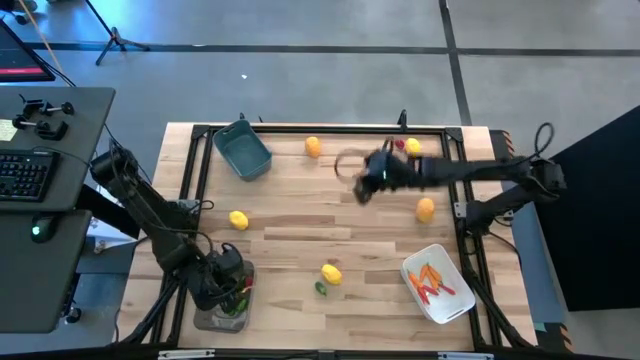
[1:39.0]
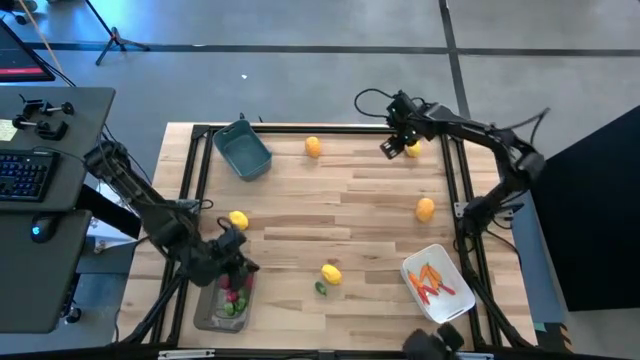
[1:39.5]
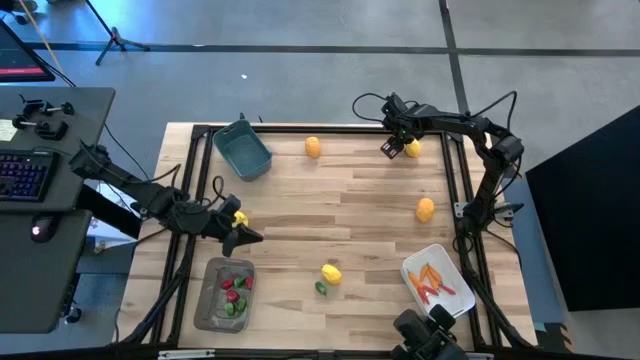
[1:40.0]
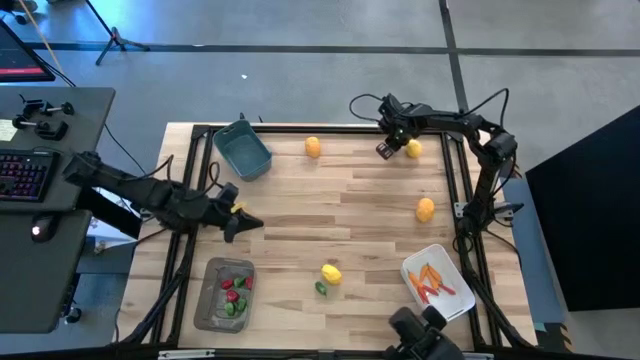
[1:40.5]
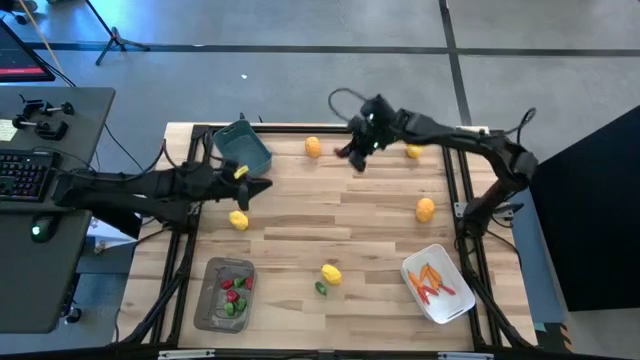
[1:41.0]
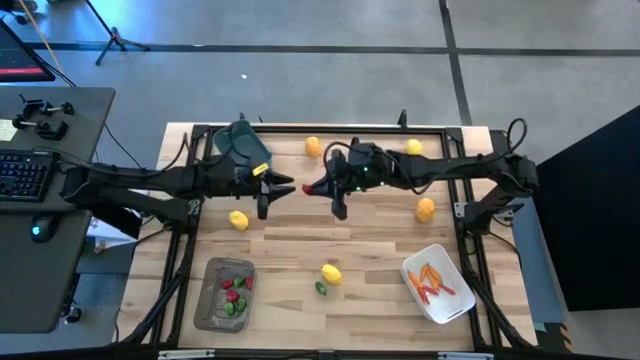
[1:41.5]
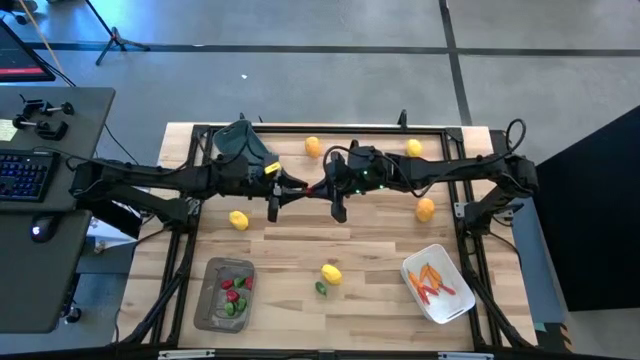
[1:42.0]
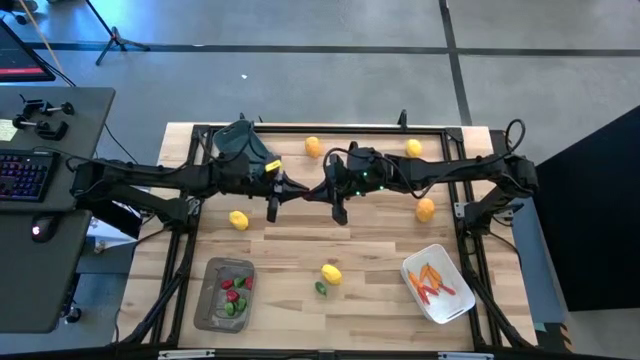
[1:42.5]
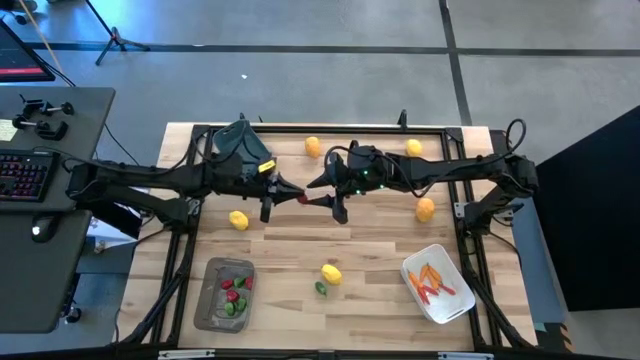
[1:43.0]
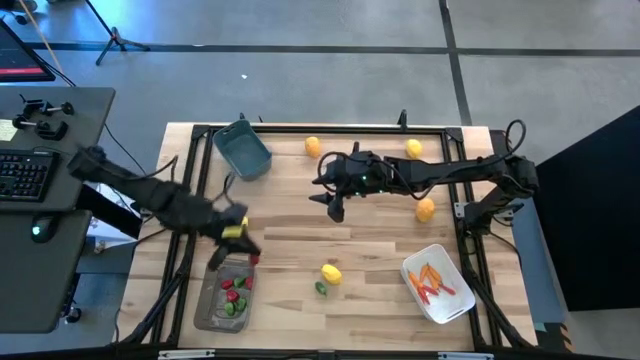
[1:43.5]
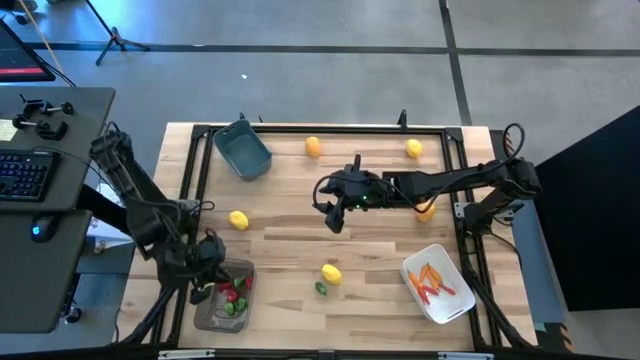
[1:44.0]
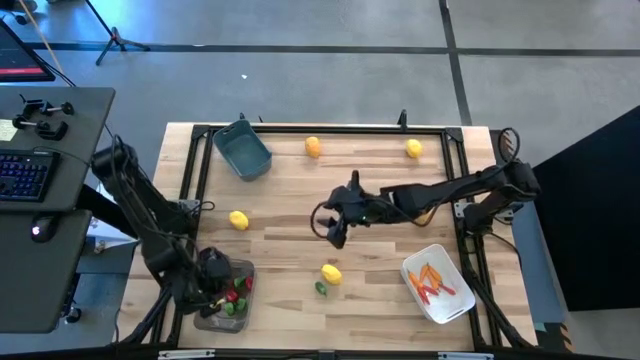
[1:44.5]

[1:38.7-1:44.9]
Task: Sort produce into baskets
Put the red chili pepper into the black bin

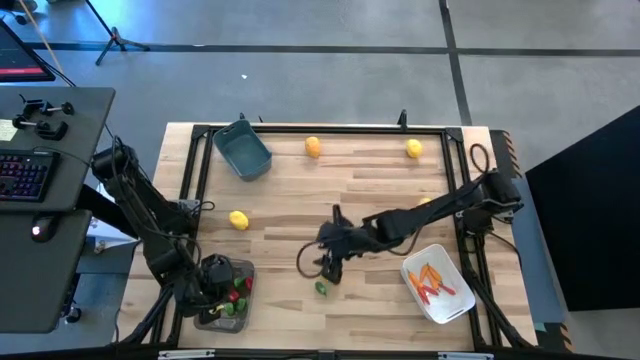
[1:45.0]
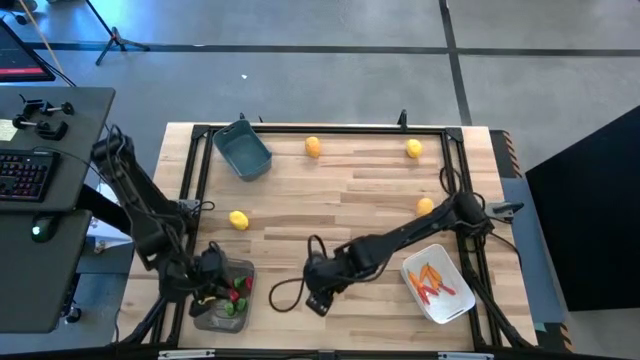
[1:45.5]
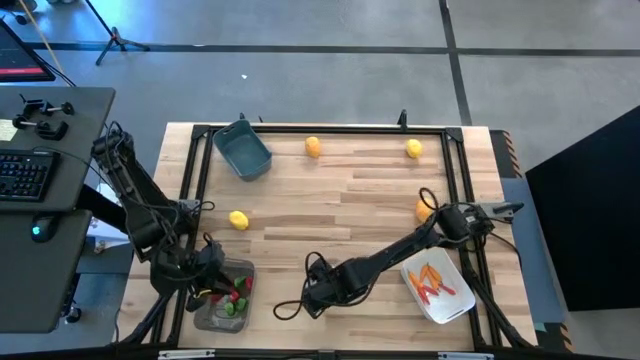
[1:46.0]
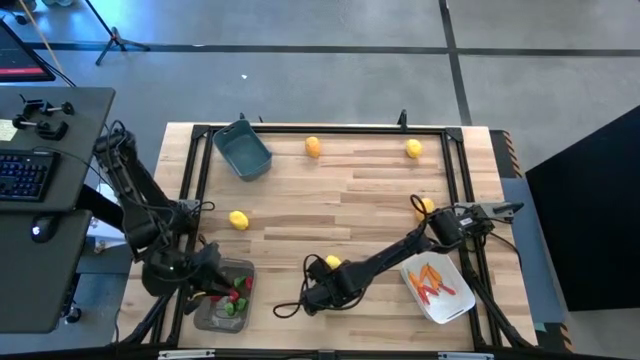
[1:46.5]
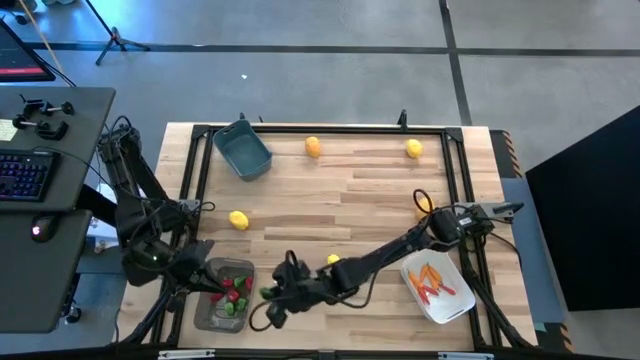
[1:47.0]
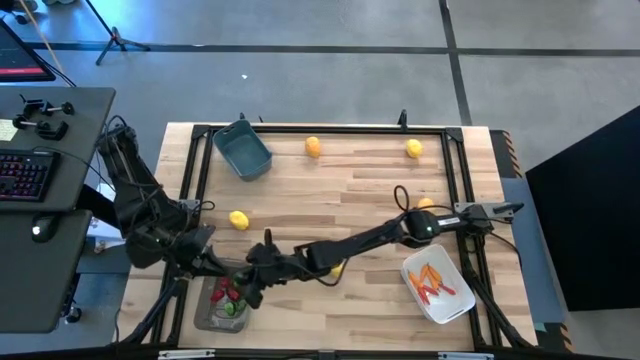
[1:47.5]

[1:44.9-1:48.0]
Put the green chili pepper into the black bin

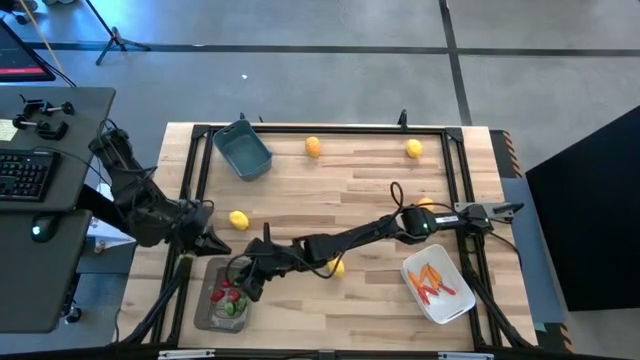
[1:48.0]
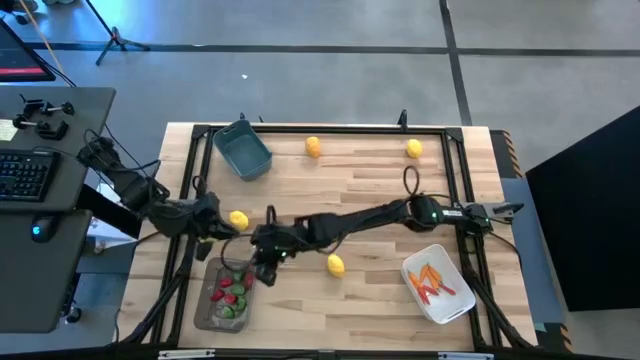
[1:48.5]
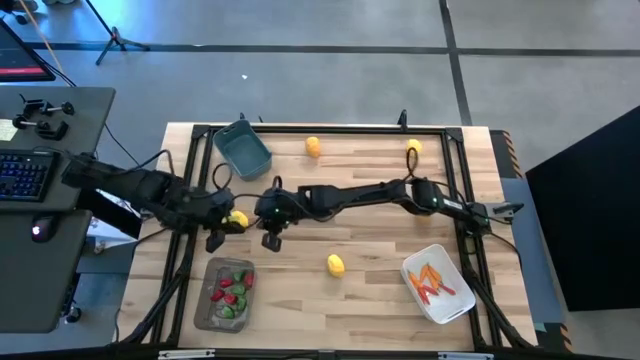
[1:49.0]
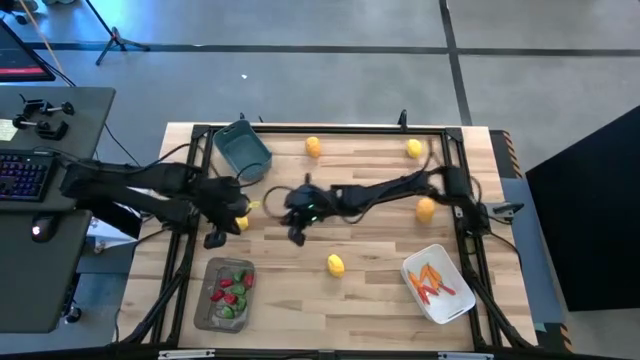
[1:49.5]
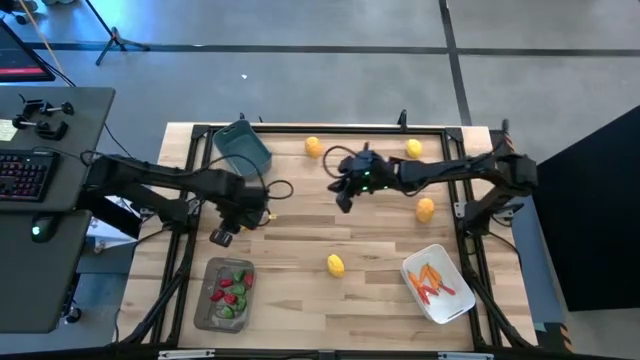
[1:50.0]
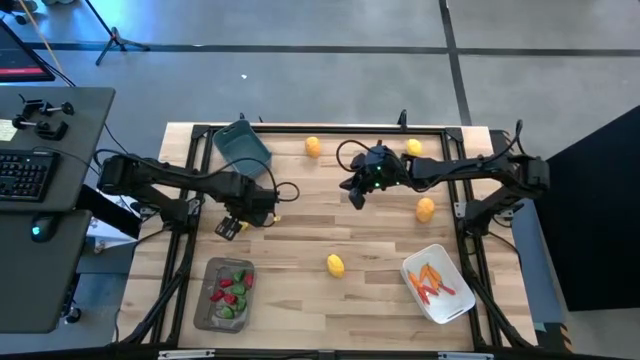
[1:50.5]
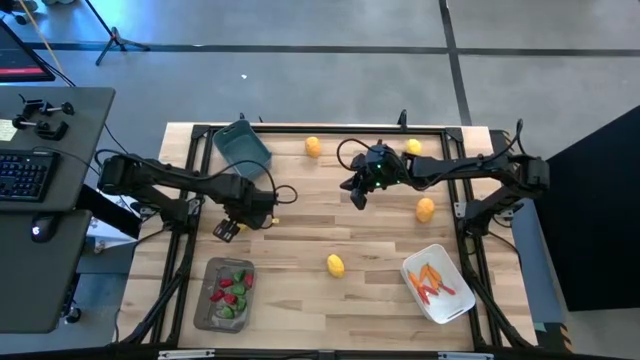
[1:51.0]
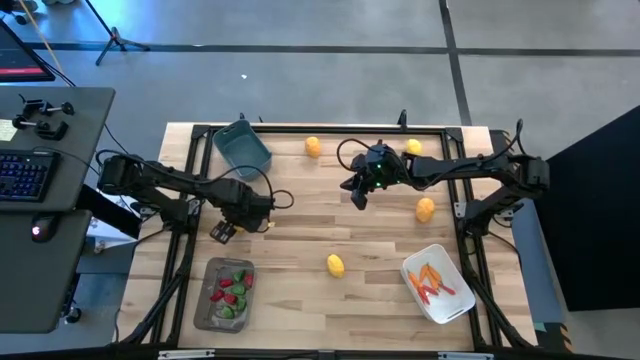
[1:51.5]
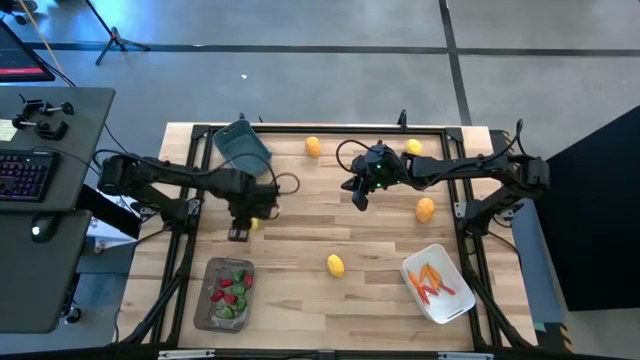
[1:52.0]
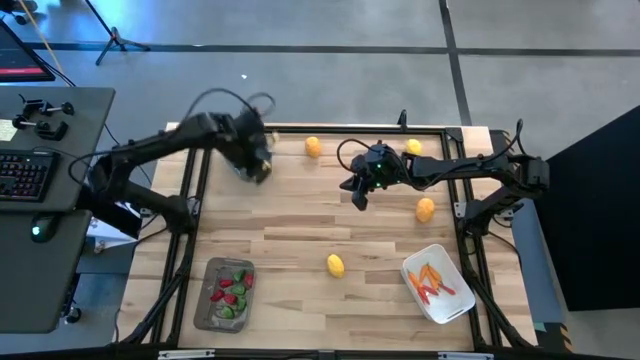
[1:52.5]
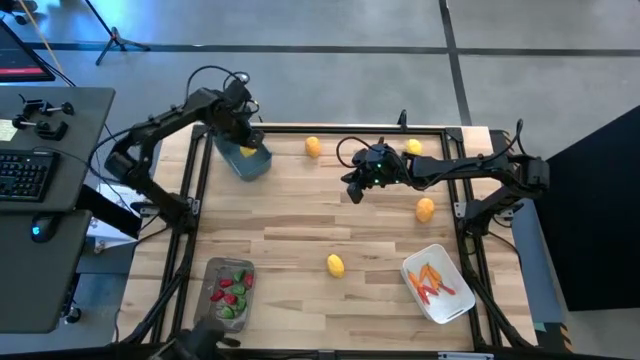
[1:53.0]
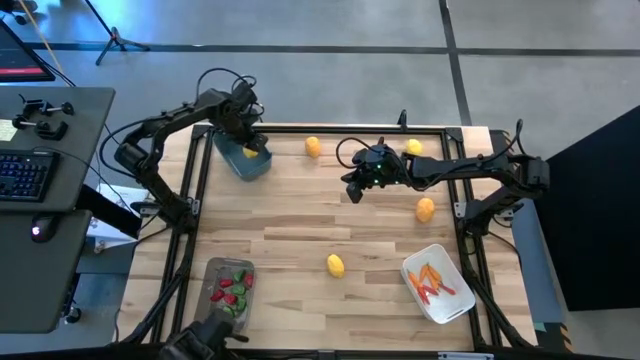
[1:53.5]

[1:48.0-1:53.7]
Put the lemon into the blue bin

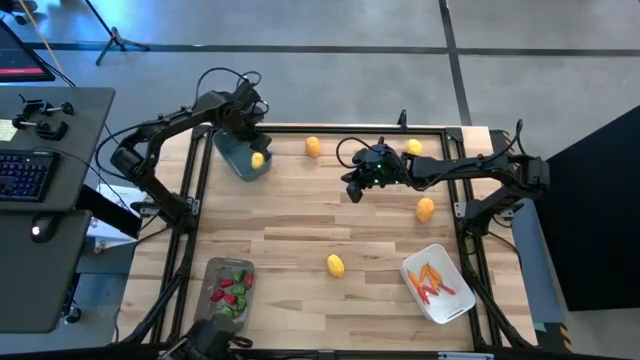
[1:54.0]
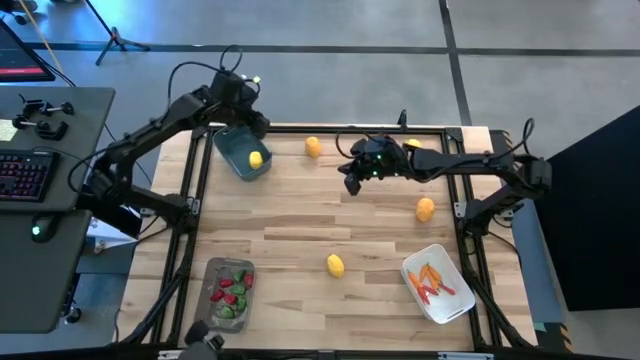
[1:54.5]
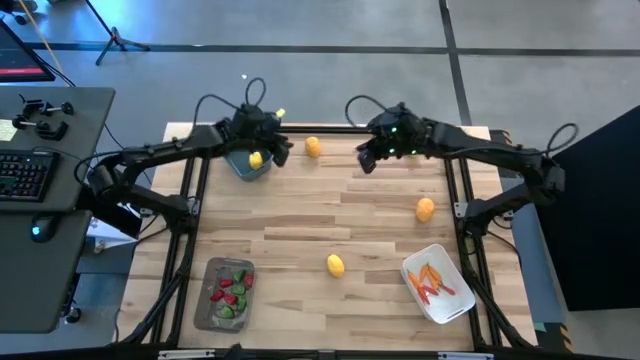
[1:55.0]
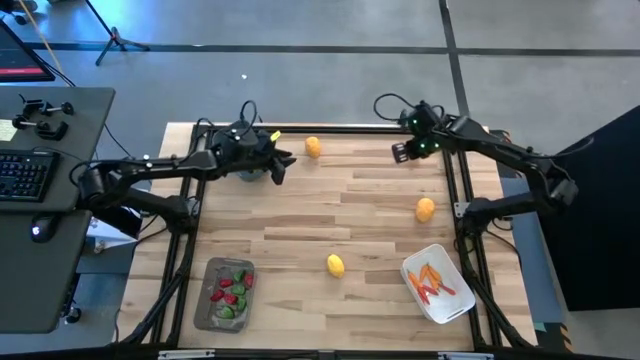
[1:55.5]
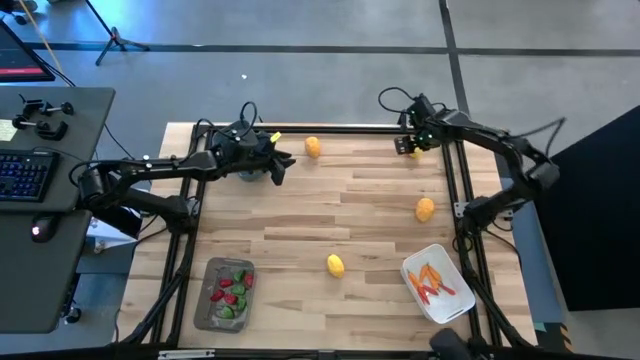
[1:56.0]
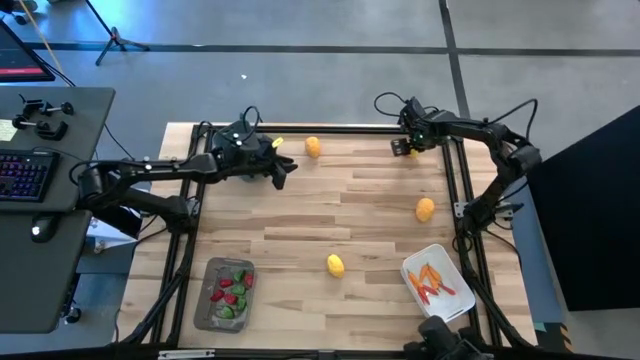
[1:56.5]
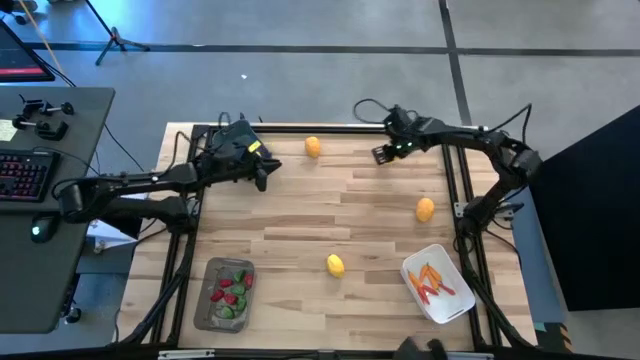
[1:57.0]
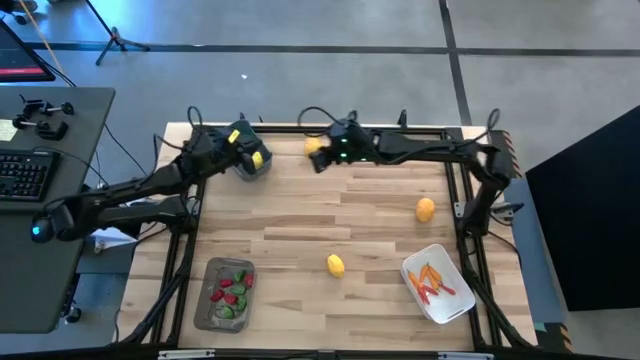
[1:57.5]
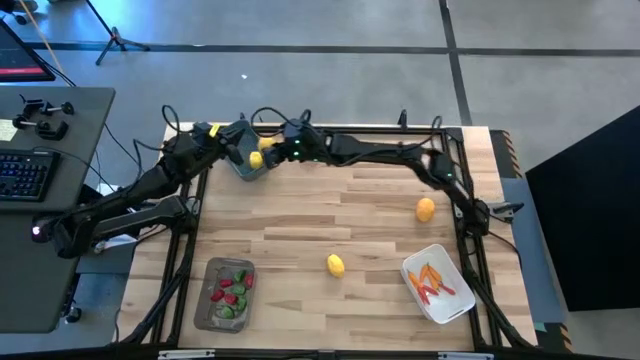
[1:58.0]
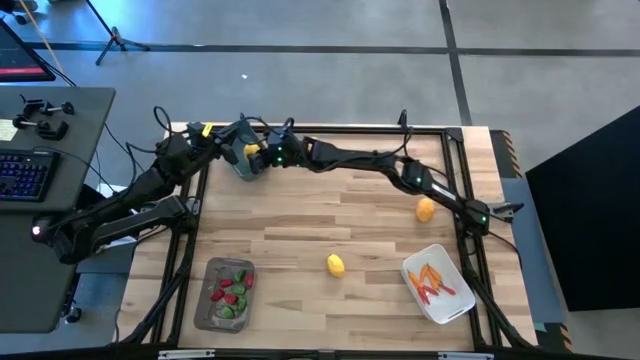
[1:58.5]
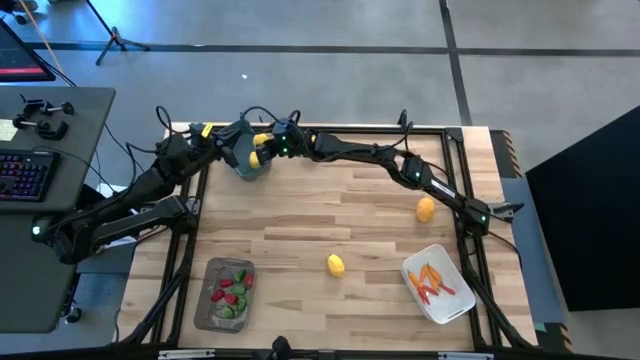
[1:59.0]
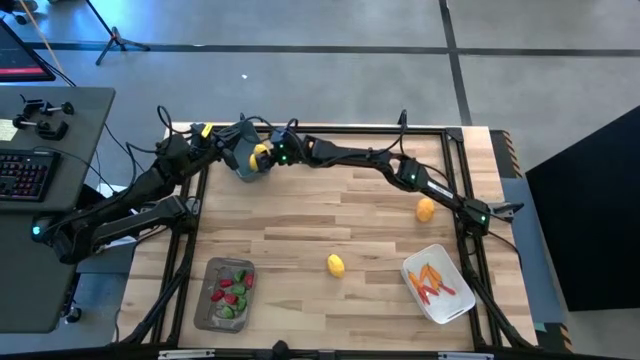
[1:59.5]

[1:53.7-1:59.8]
Put the lemon into the blue bin
